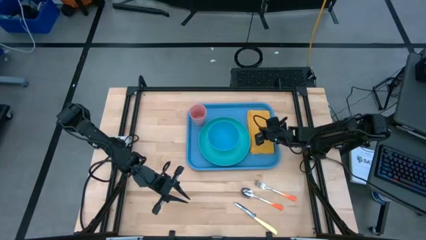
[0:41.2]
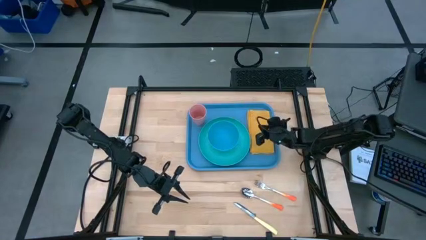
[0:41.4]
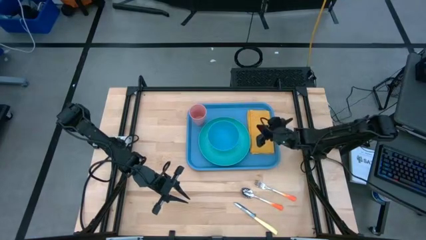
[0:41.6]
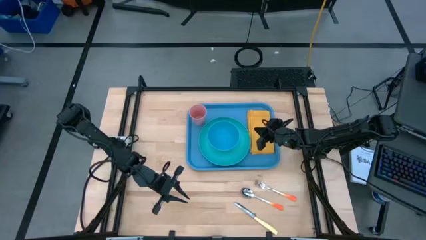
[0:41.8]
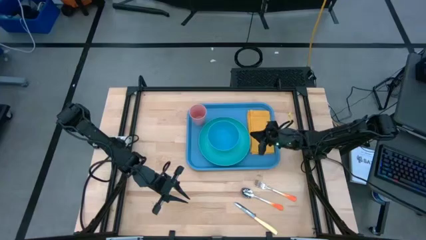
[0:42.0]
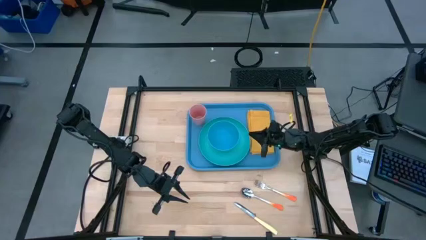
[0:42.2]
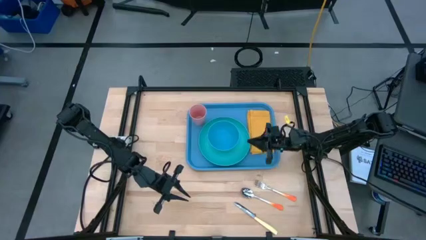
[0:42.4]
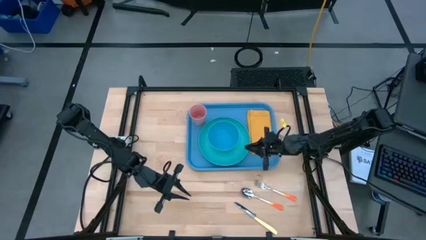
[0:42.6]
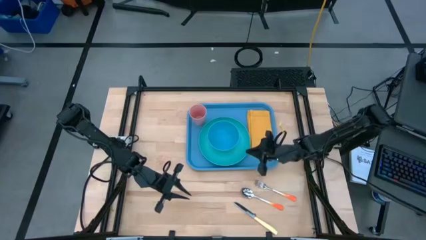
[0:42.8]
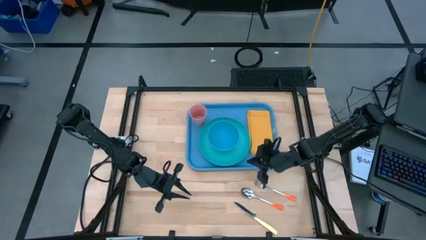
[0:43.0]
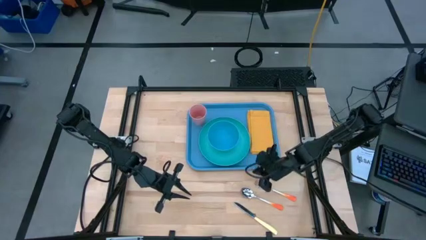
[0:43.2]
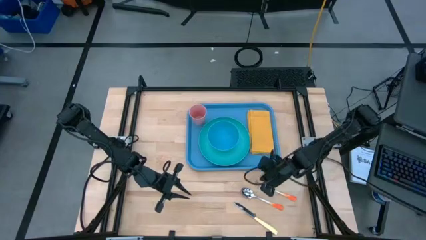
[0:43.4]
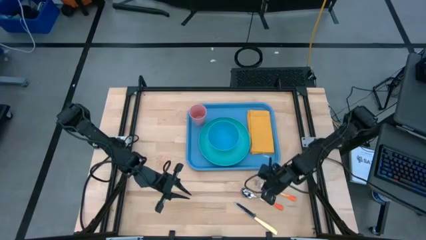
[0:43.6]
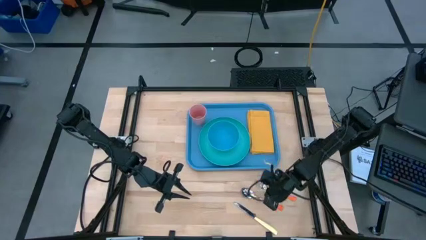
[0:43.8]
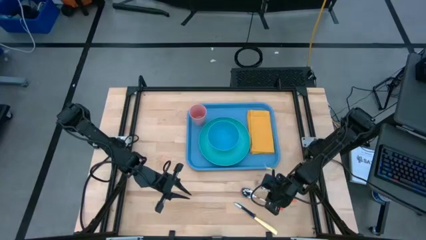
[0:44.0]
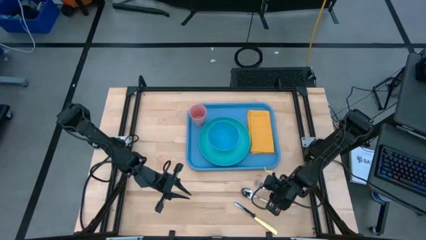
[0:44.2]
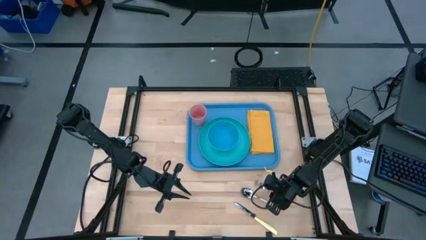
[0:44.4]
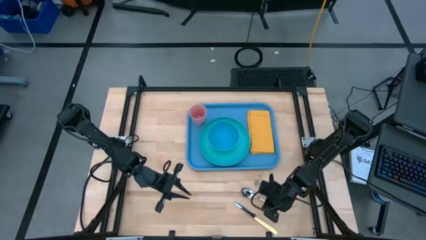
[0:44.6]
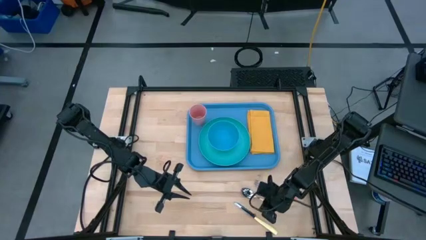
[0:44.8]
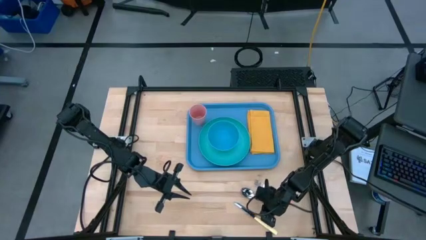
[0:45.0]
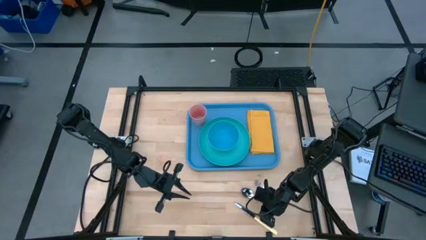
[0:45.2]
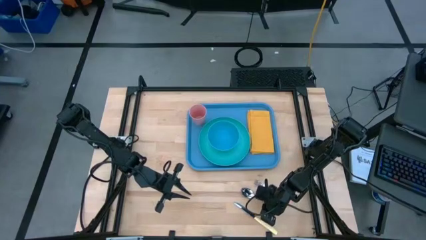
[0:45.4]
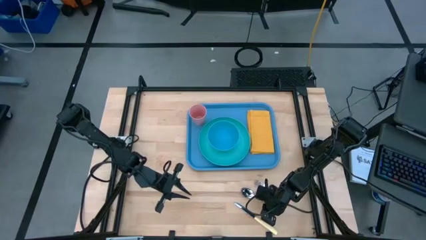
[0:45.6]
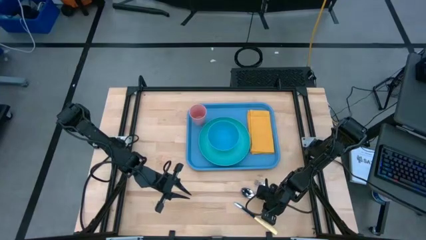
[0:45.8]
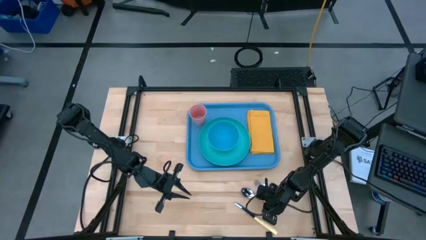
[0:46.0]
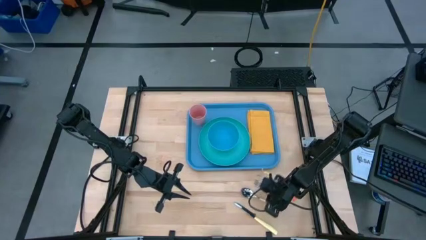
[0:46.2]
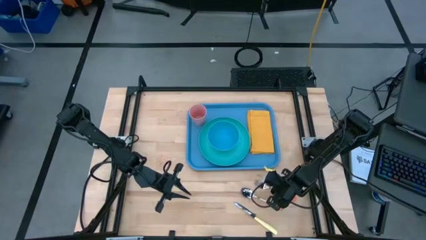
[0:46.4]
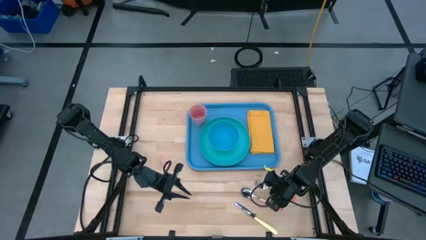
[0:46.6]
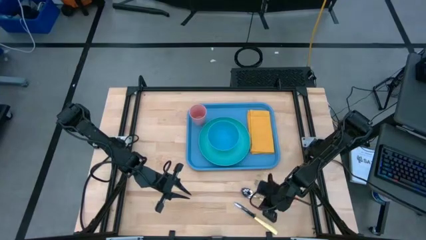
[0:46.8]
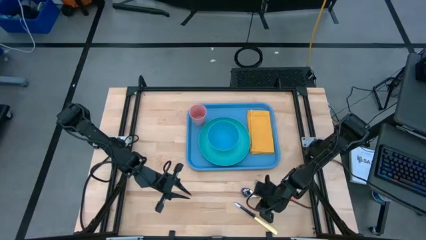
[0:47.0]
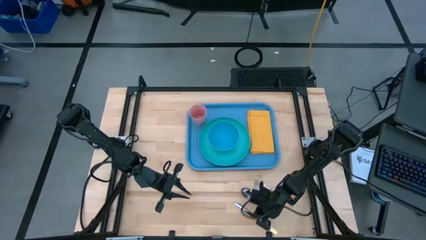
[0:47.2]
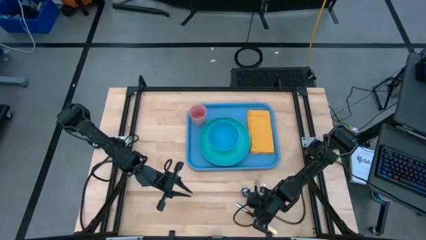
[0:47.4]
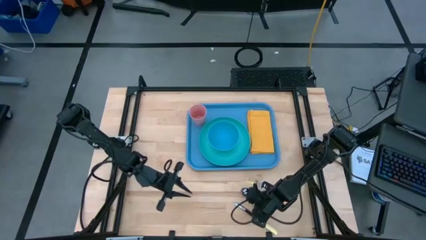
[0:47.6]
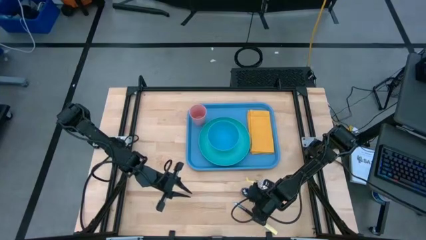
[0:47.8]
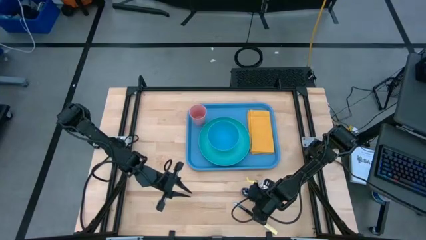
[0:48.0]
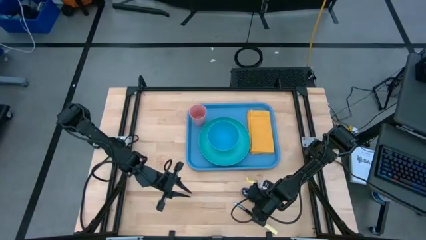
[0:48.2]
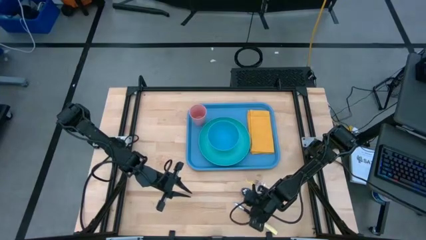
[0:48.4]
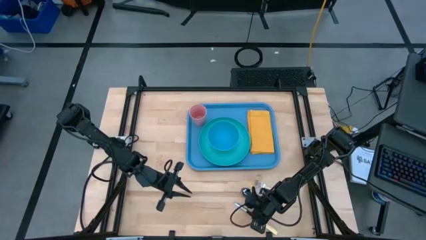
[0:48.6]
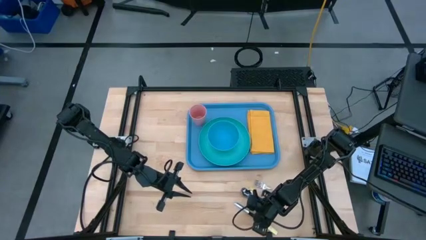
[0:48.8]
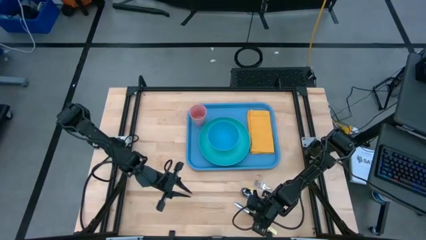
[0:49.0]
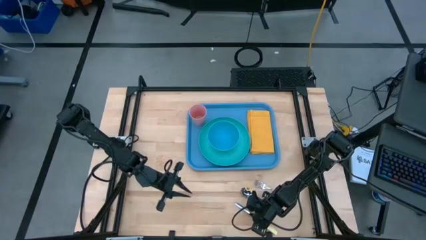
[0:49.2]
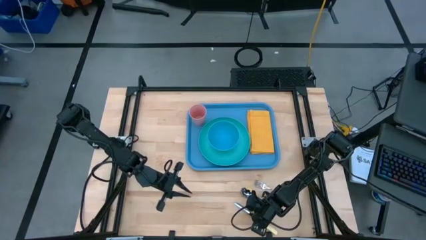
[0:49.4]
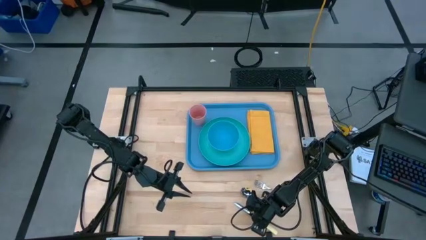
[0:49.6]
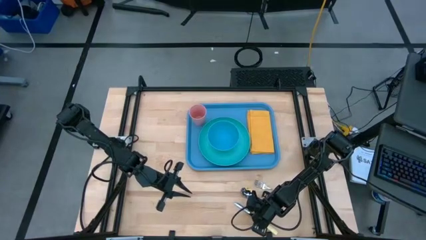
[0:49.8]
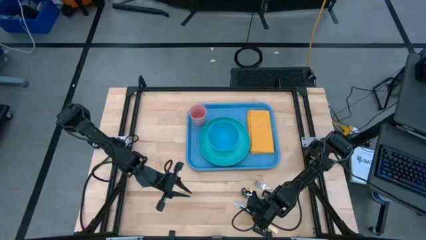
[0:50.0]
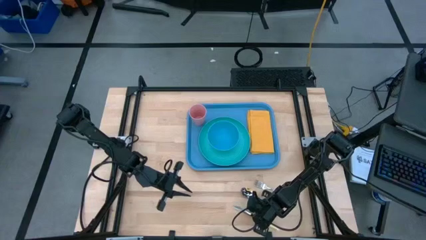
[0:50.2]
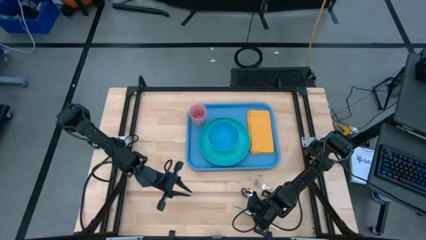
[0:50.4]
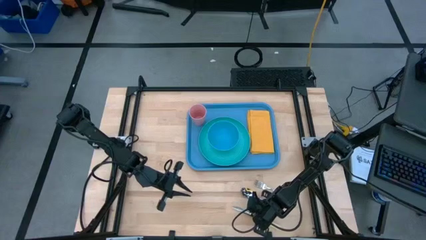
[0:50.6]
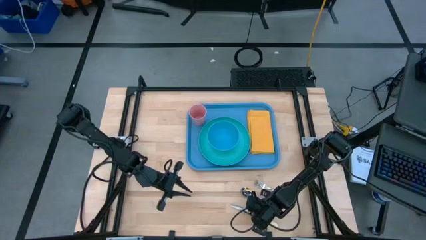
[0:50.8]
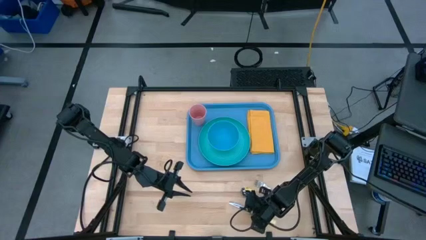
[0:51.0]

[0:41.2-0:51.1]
Task: Set up tray
Put the yellow knife on top of the yellow napkin
